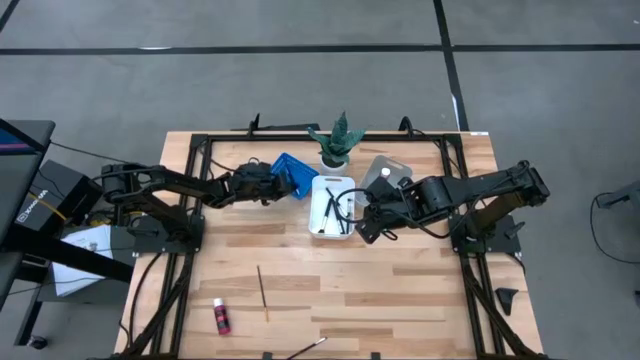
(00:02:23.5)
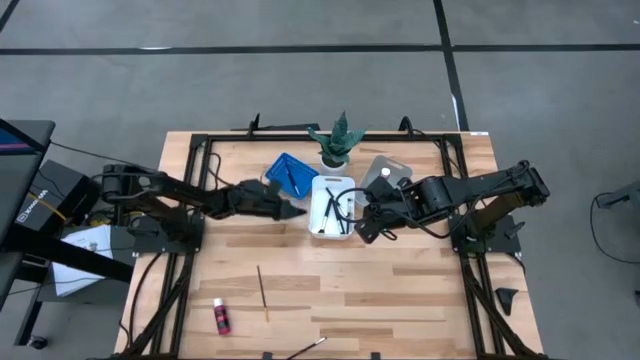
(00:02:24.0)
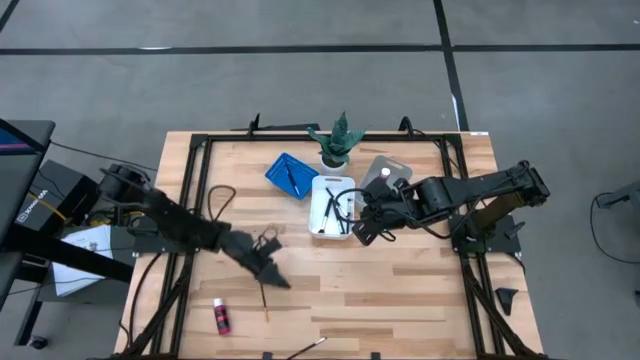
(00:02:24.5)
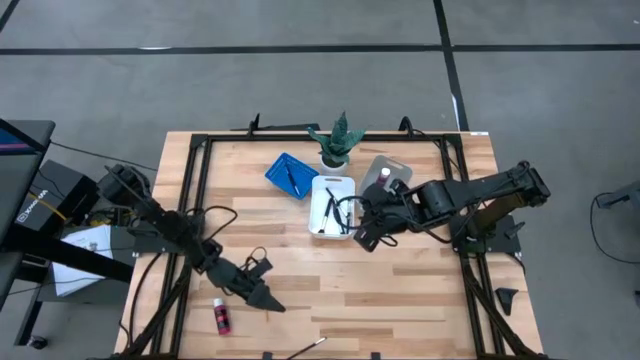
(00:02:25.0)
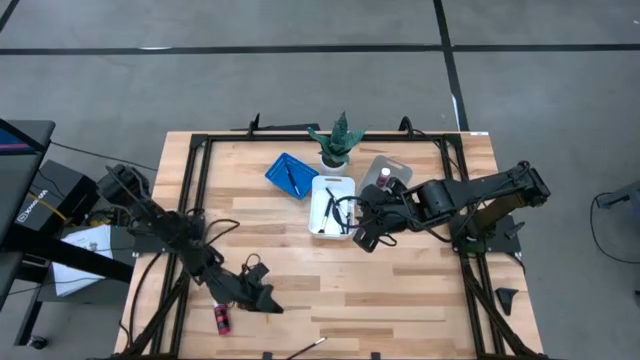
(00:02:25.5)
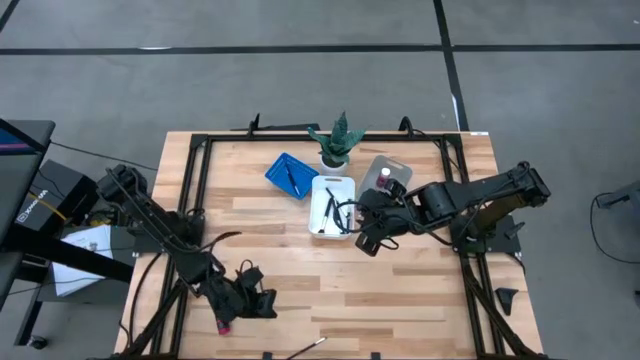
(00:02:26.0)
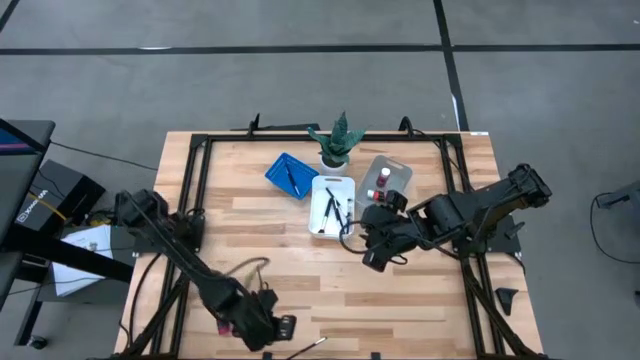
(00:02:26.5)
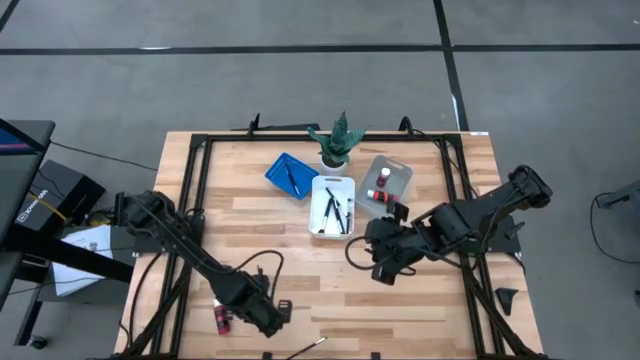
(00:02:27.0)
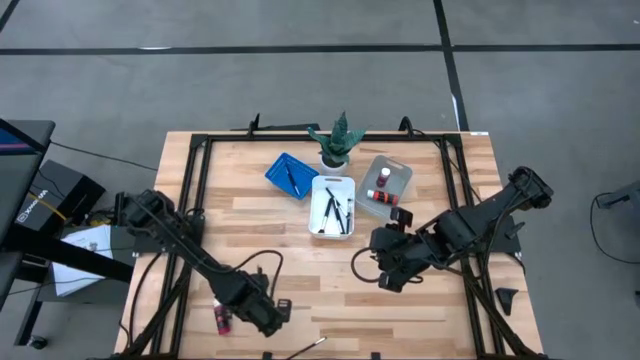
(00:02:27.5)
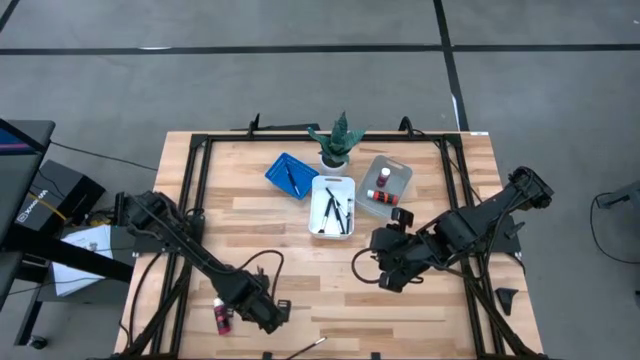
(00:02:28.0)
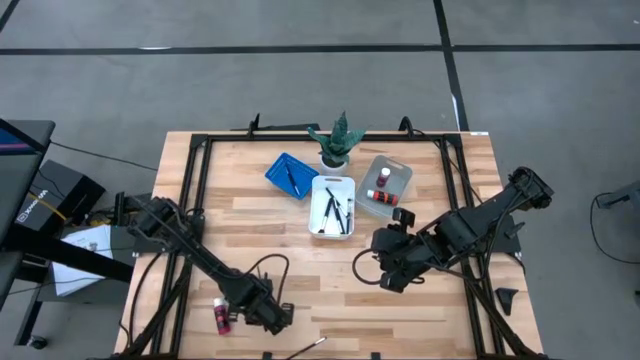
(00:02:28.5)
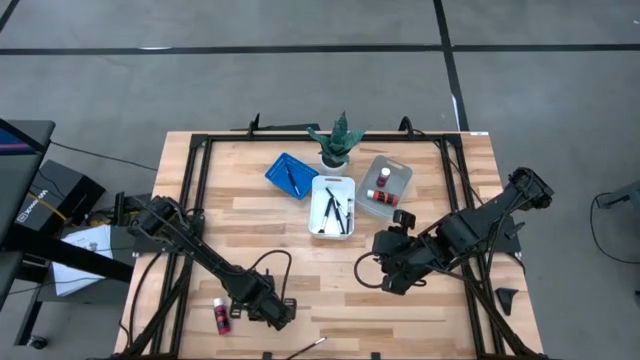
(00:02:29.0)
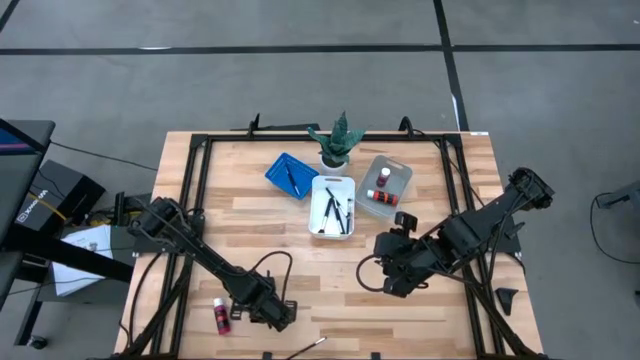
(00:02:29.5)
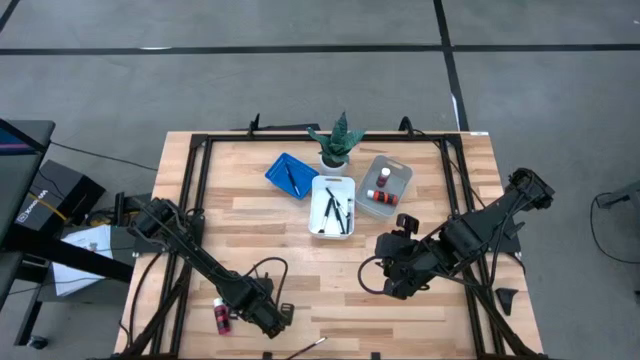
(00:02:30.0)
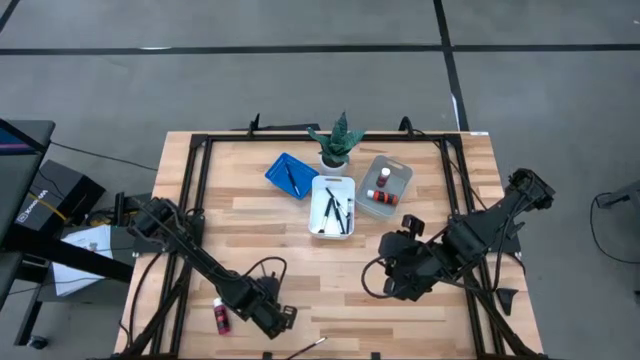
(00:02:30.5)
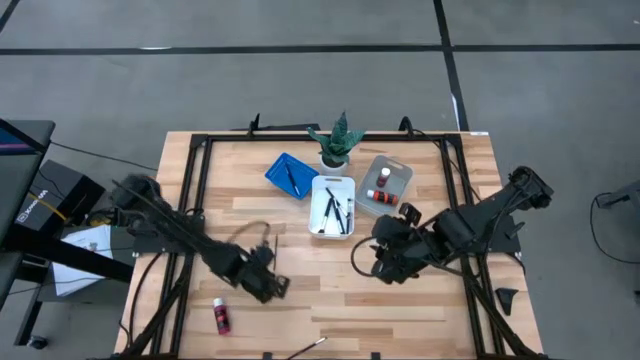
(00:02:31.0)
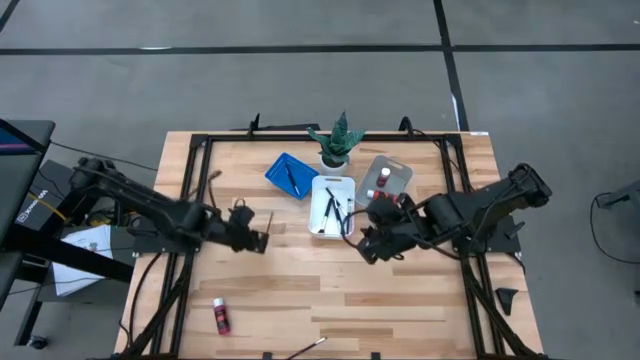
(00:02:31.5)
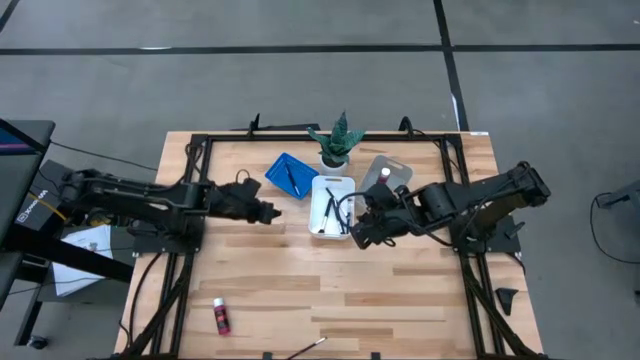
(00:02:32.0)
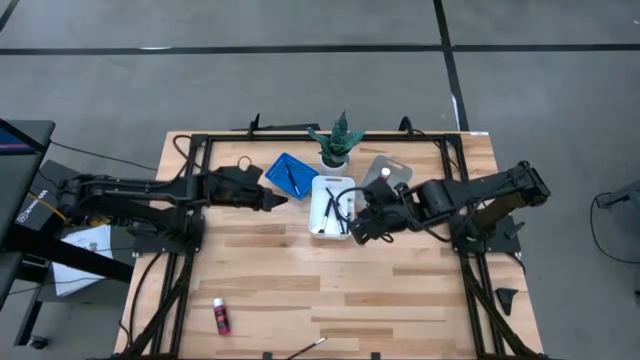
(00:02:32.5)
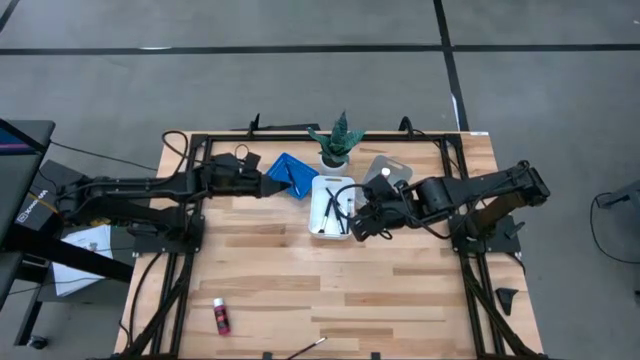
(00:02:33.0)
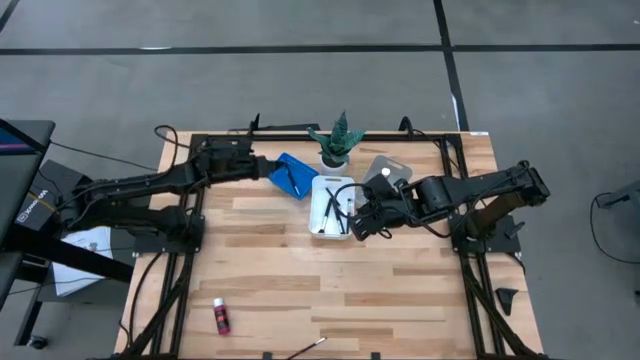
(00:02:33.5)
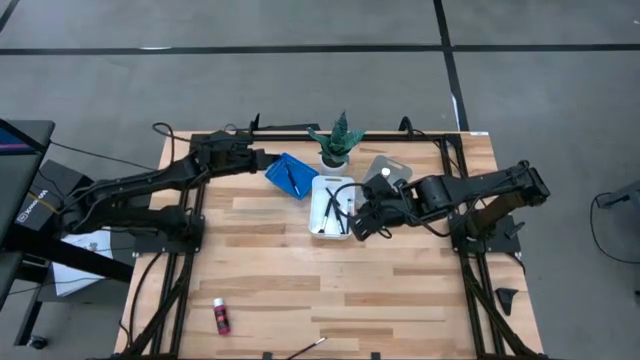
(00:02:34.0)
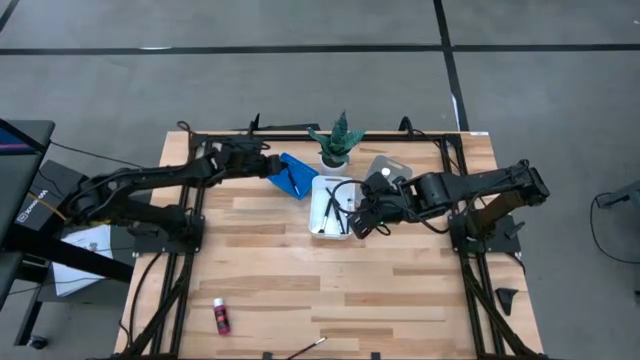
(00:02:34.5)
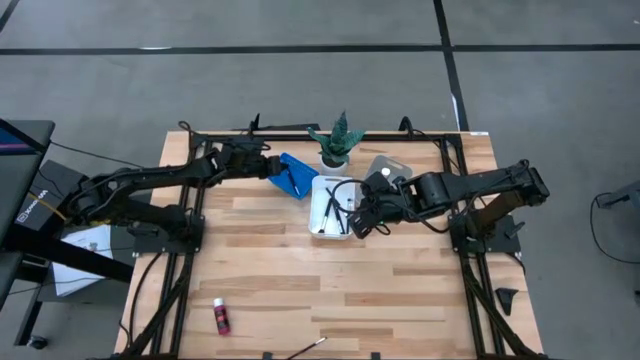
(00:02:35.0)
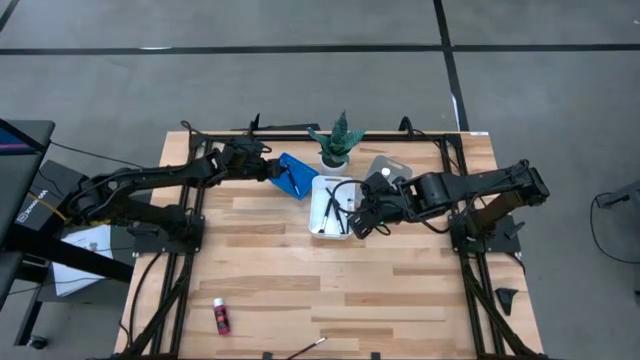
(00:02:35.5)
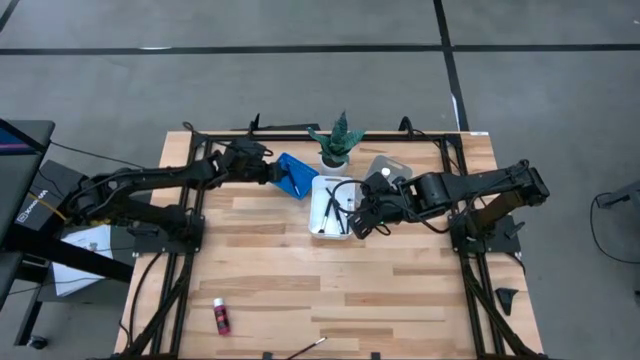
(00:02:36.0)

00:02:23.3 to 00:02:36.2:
Task: Pick & Place Paint Supplies
Put the small gold paint brush into the blue bin

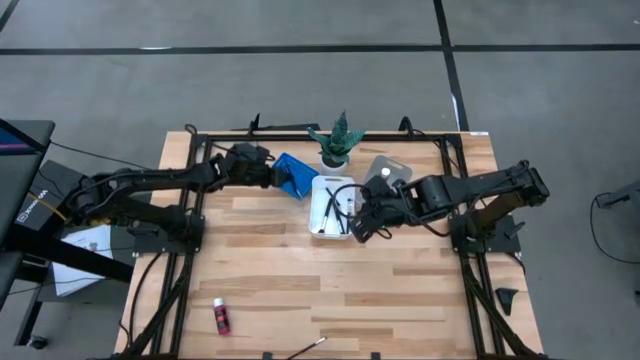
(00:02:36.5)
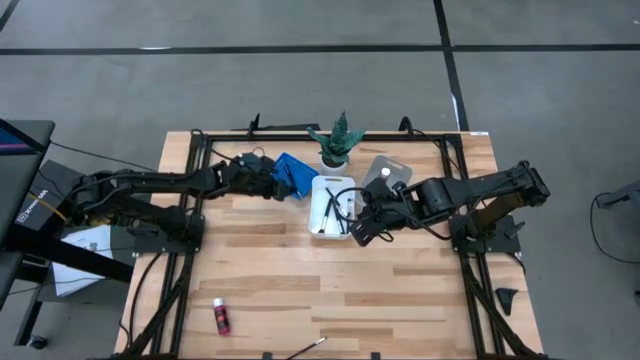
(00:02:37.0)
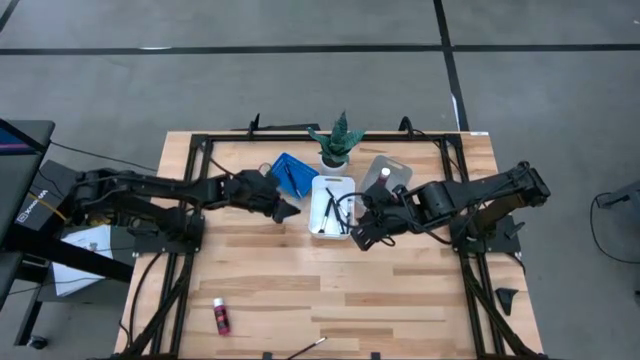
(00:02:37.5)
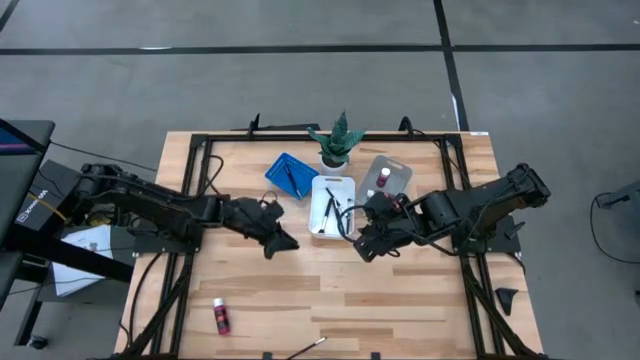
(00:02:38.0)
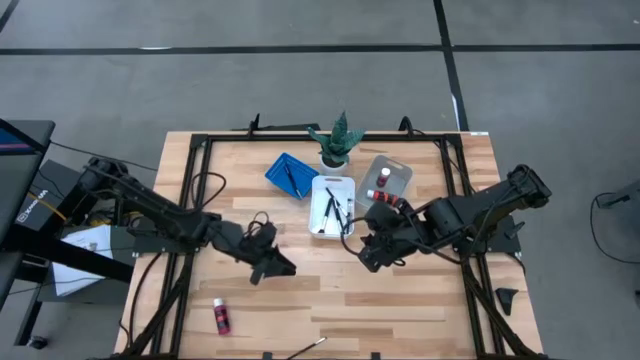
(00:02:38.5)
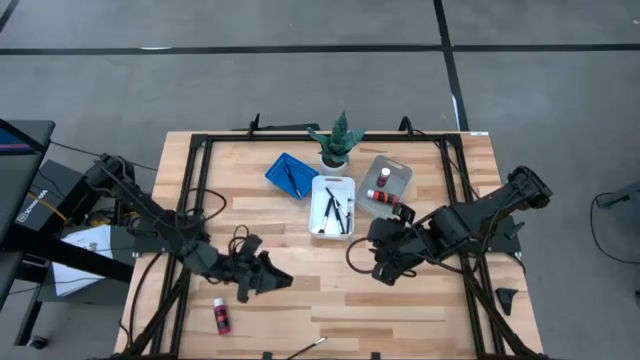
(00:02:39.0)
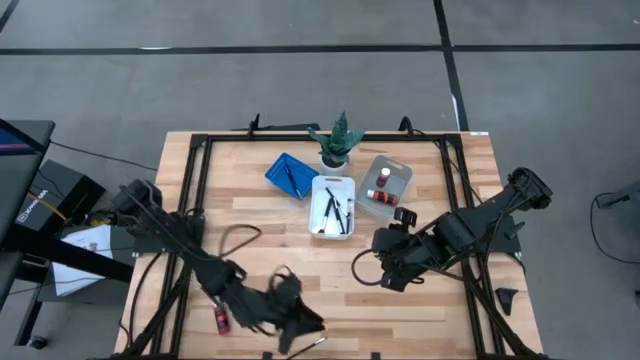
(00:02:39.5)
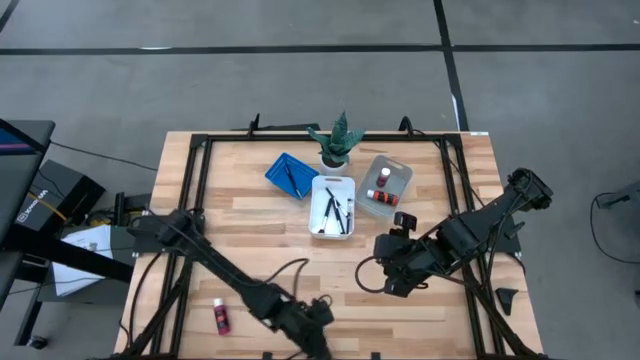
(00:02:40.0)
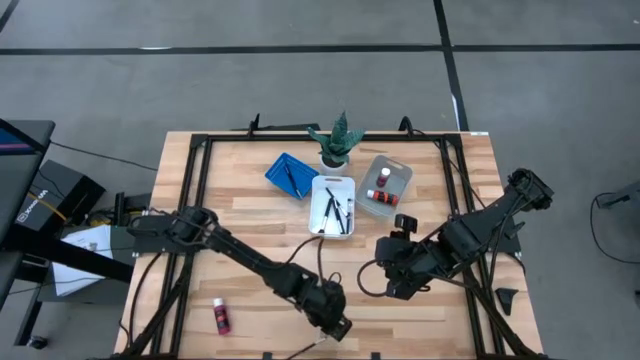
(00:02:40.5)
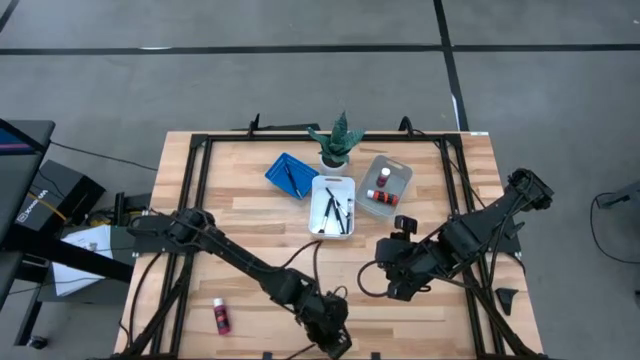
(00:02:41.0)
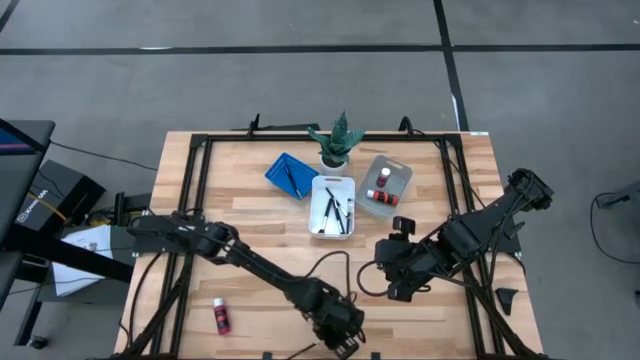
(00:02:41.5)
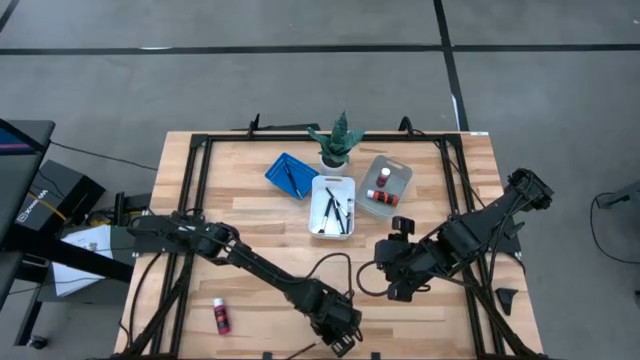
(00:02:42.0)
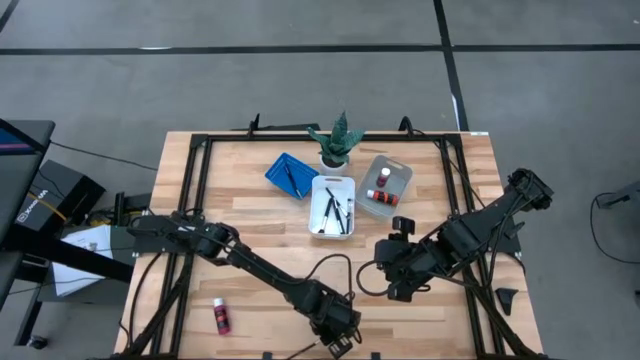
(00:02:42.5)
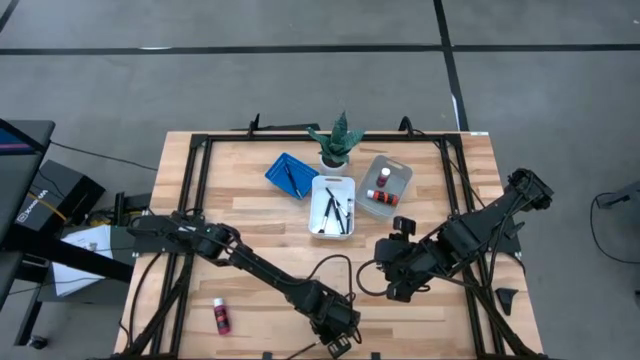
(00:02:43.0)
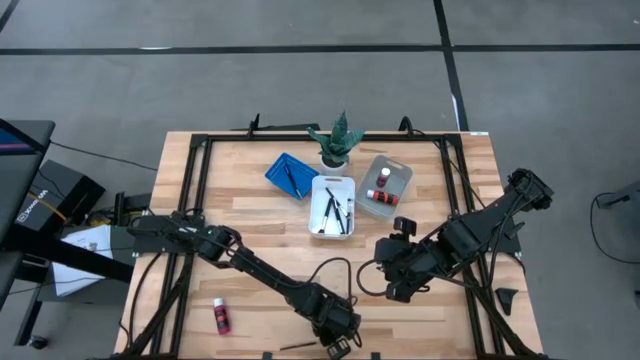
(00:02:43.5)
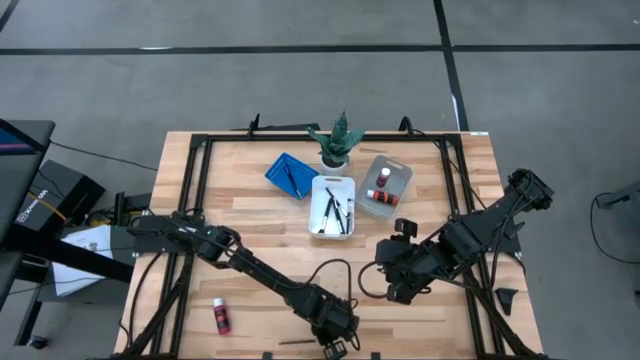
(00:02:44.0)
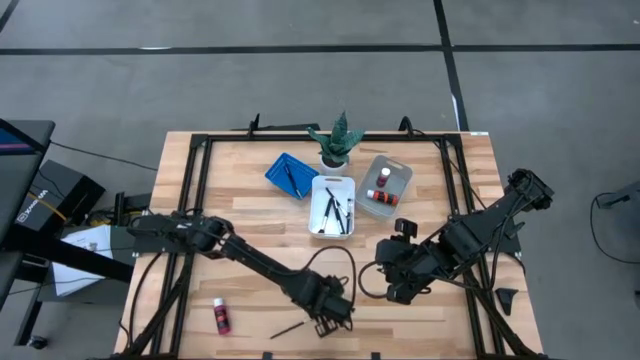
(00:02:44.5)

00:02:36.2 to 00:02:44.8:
Put the small black paint brush into the blue bin

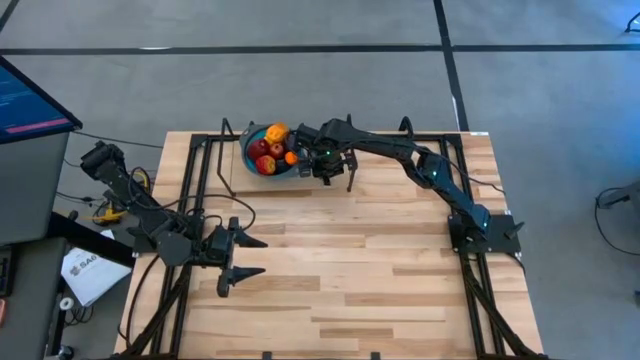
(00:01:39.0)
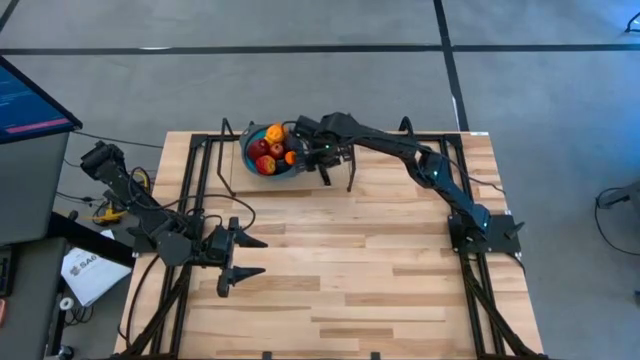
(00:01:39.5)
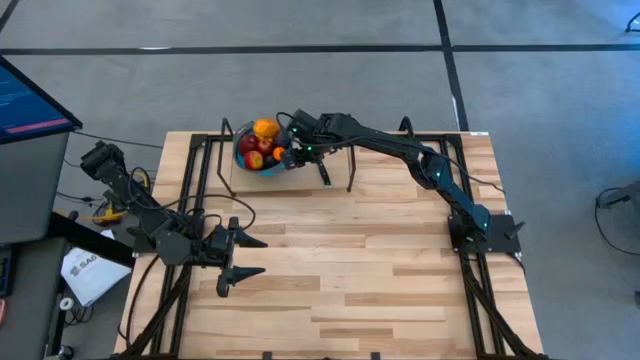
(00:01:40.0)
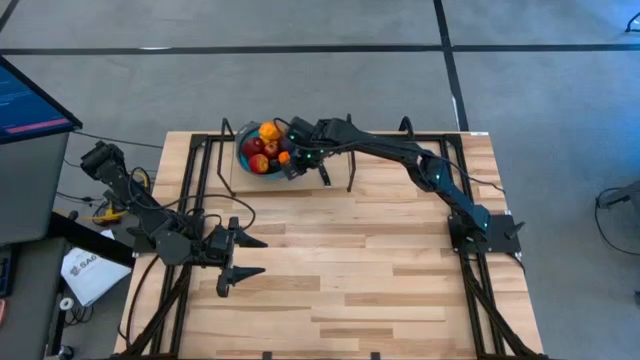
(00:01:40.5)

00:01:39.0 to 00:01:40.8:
Task: Pick & Place Fruit
Adjust the blue strainer bowl on the shelf
